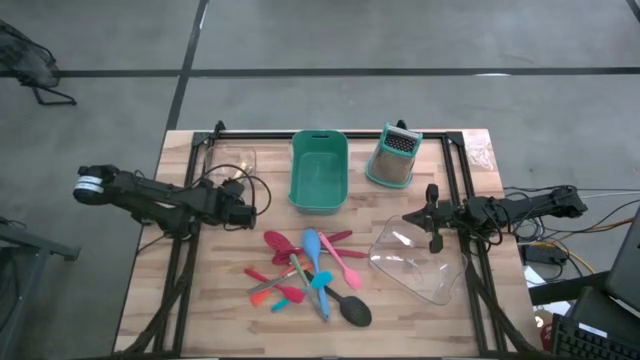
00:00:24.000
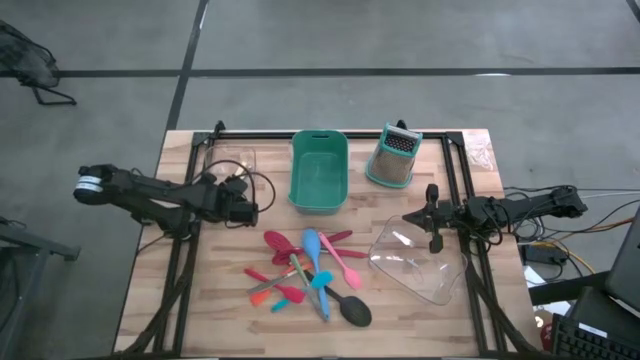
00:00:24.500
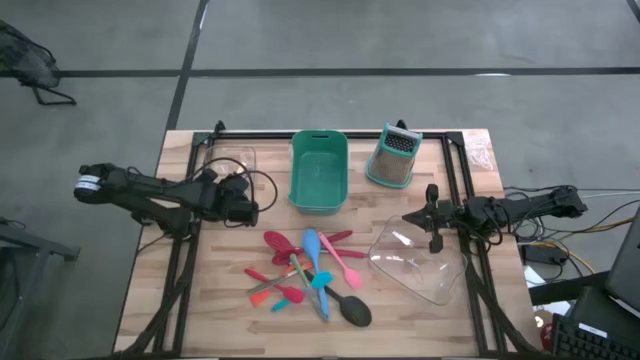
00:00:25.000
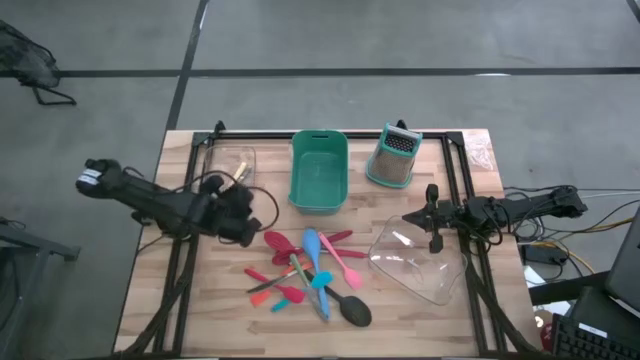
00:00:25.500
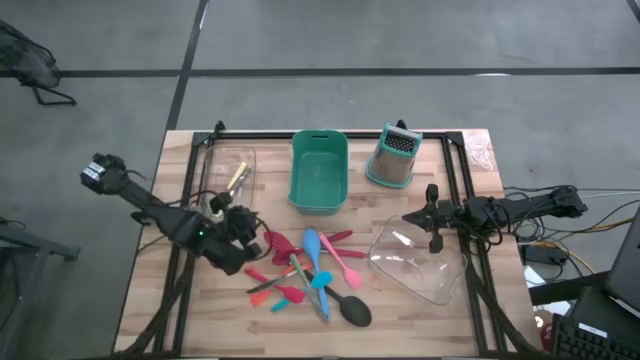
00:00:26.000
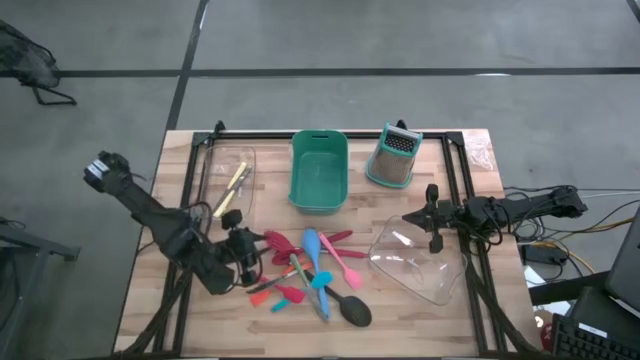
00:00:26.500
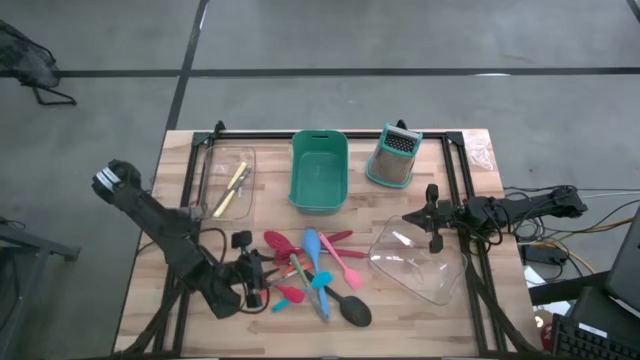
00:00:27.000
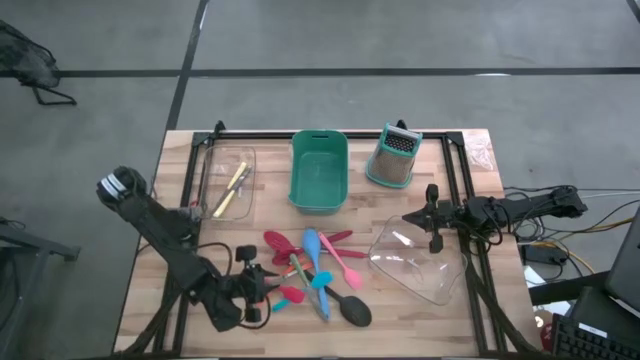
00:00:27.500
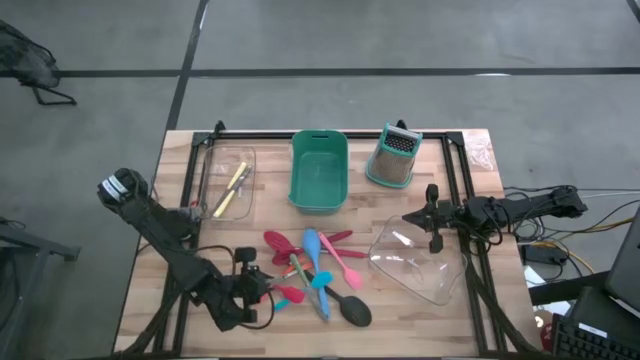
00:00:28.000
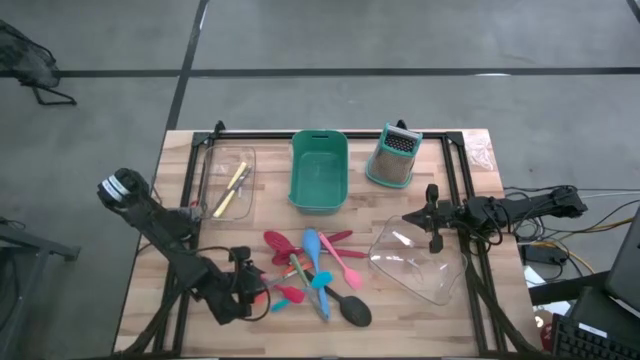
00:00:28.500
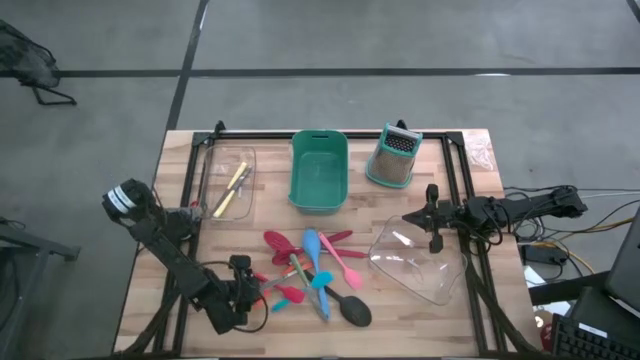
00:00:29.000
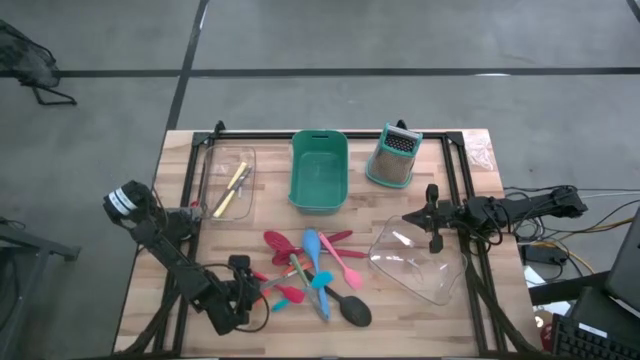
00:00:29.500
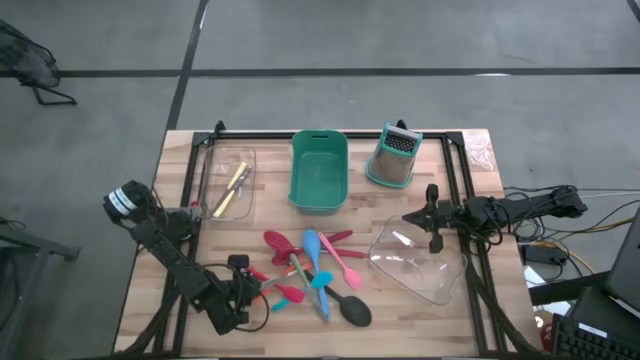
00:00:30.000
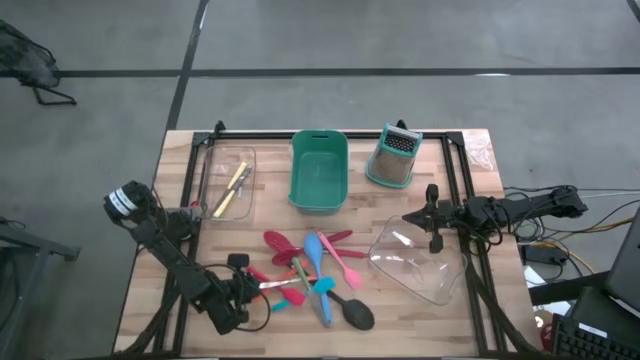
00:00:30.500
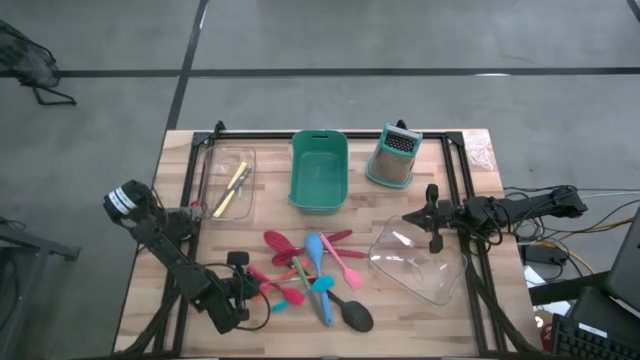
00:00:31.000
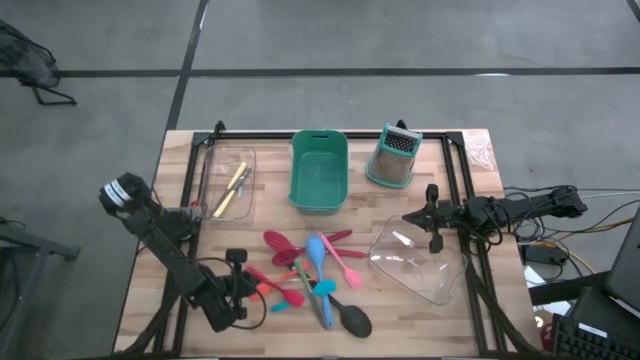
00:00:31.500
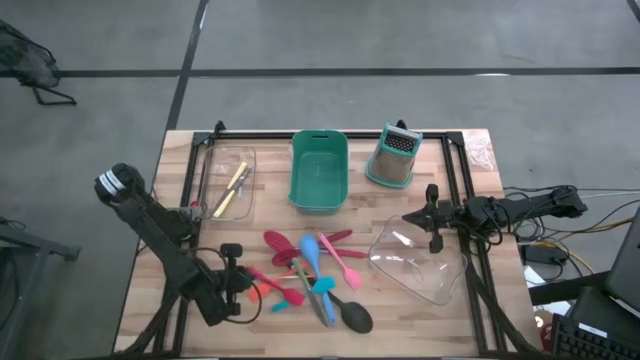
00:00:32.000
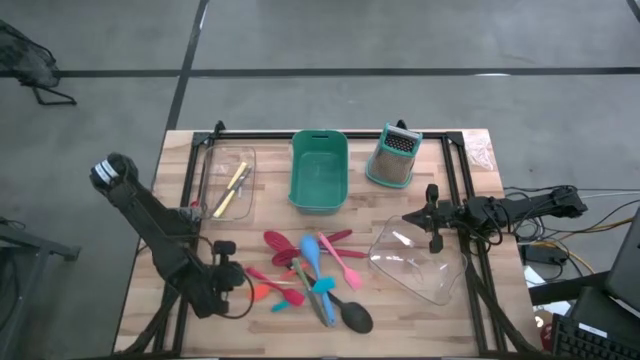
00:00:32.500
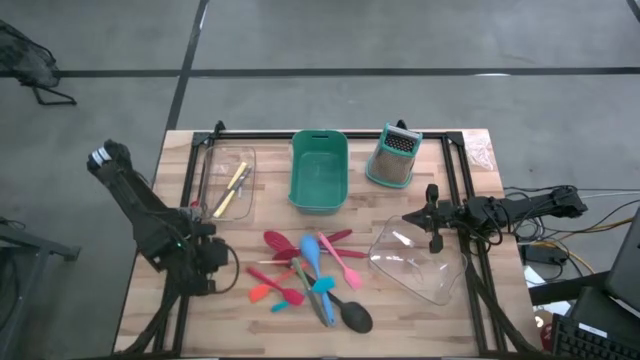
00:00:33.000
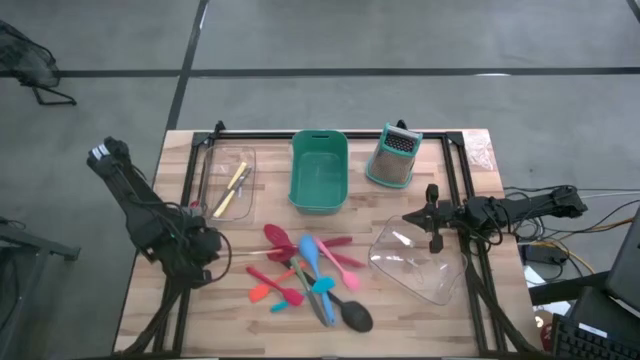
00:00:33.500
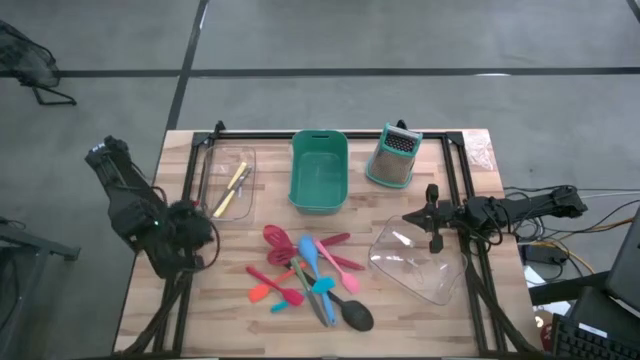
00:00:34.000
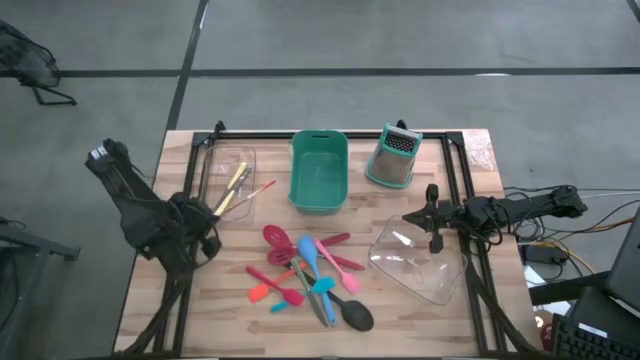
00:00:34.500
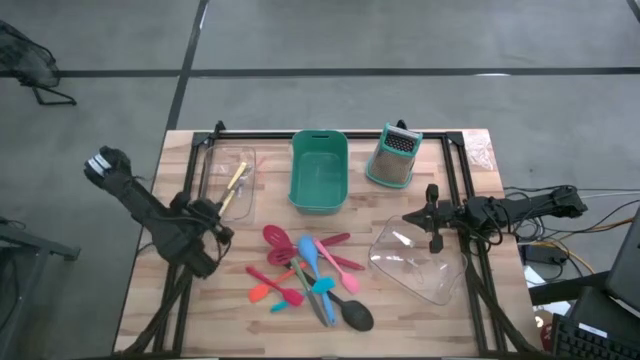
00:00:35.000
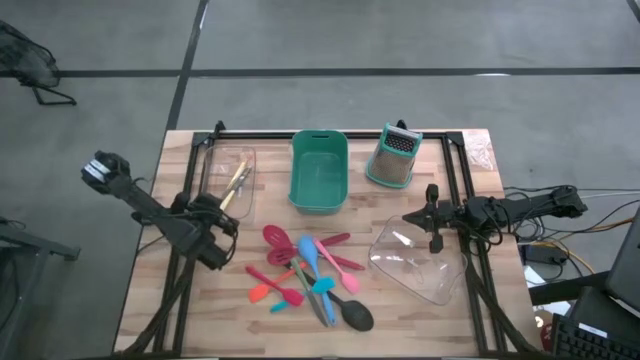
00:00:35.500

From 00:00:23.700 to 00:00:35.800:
Task: Pick & Place Kitchen Items
Put the orange table knife into the top transparent bin

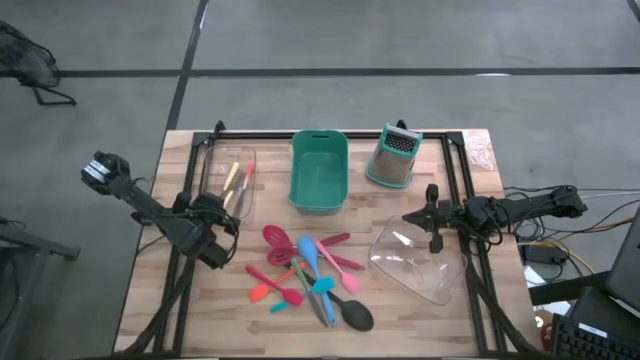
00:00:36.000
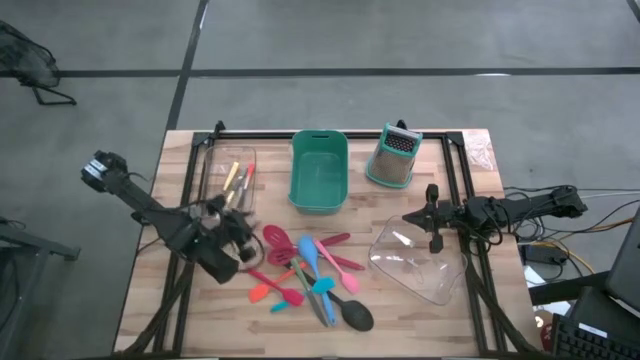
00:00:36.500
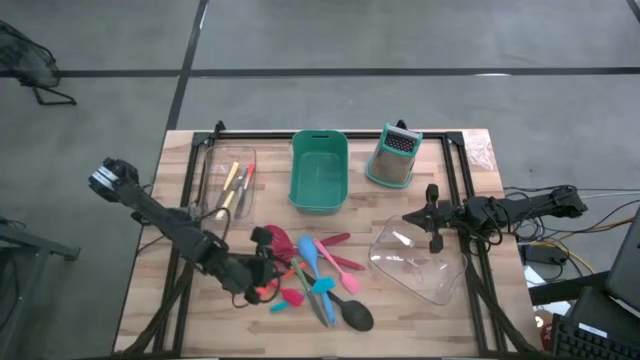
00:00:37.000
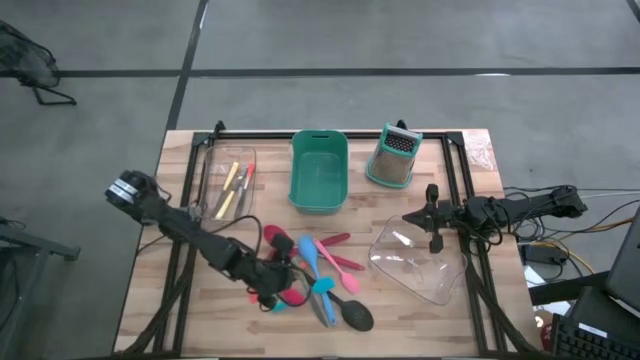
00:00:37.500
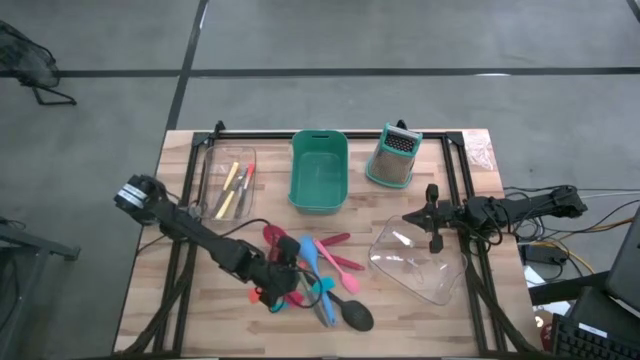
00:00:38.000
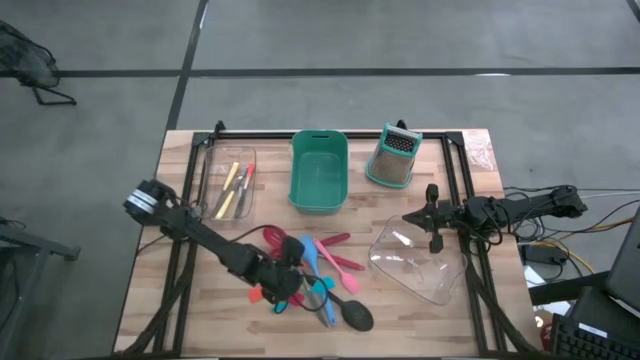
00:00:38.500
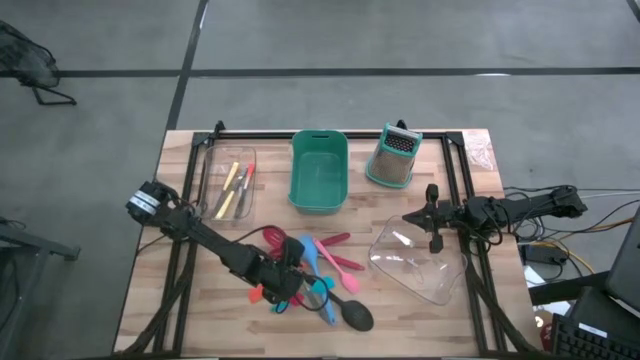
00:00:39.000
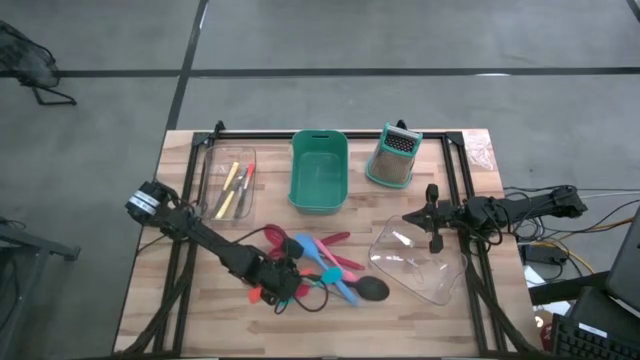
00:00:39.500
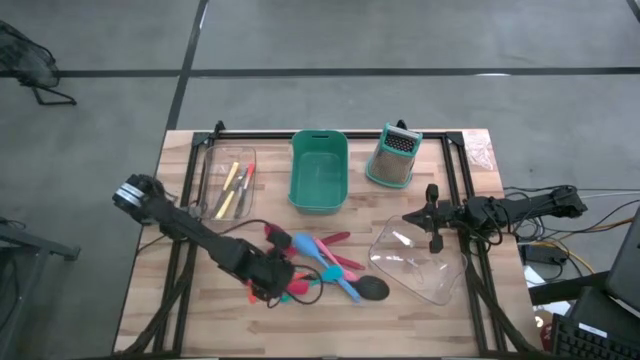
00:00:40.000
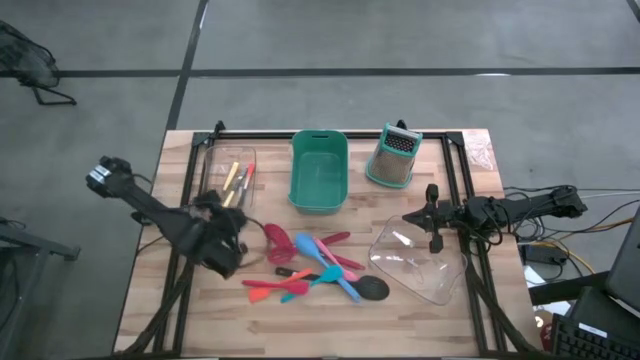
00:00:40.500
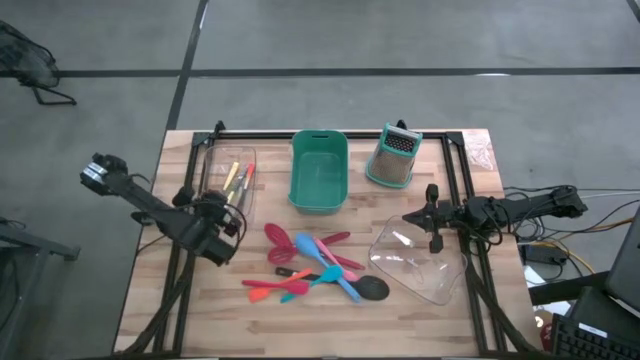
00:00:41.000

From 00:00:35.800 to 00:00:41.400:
Put the green table knife into the top transparent bin

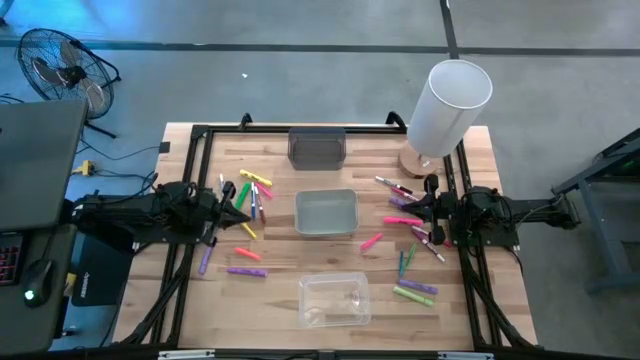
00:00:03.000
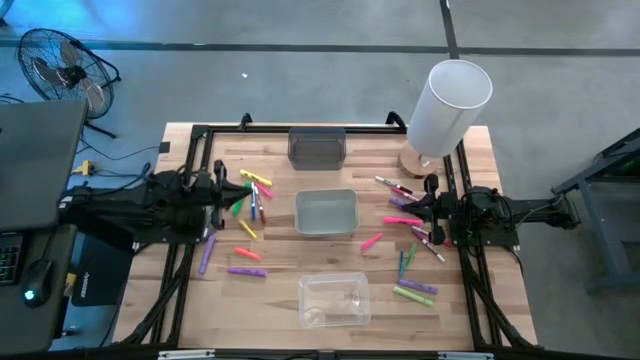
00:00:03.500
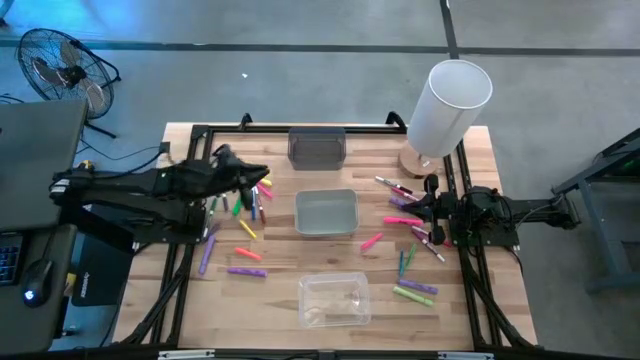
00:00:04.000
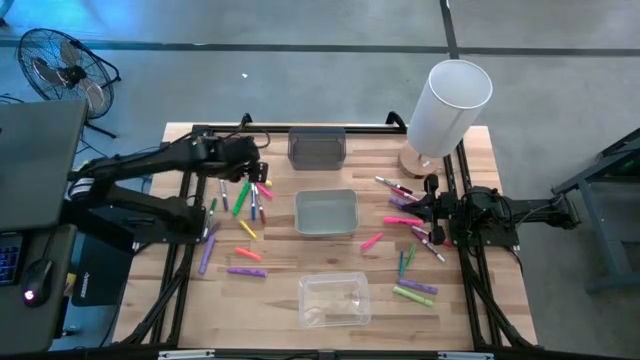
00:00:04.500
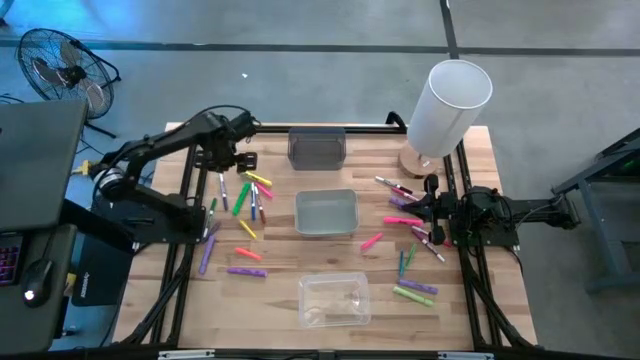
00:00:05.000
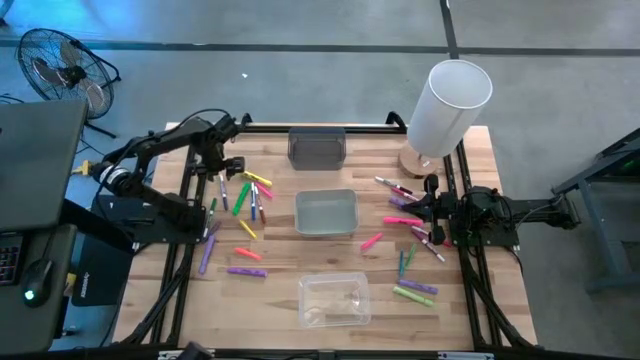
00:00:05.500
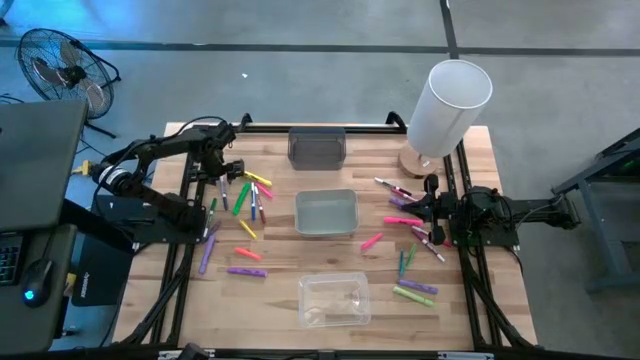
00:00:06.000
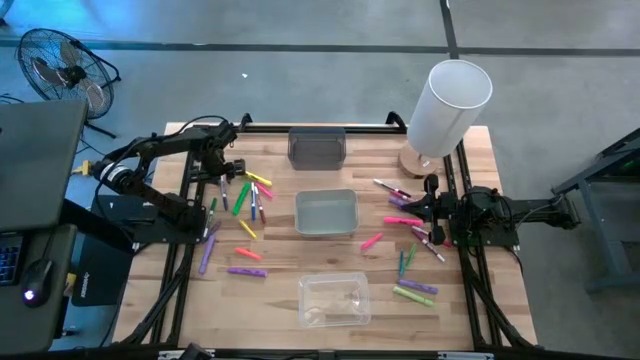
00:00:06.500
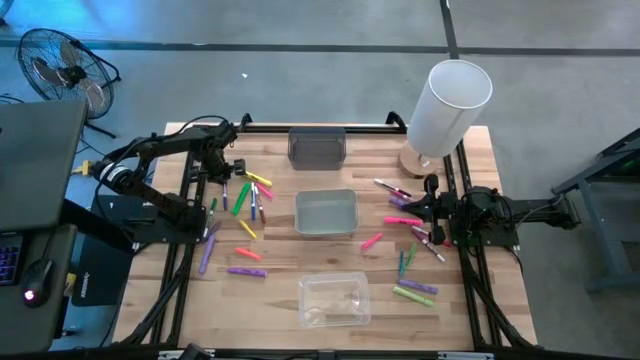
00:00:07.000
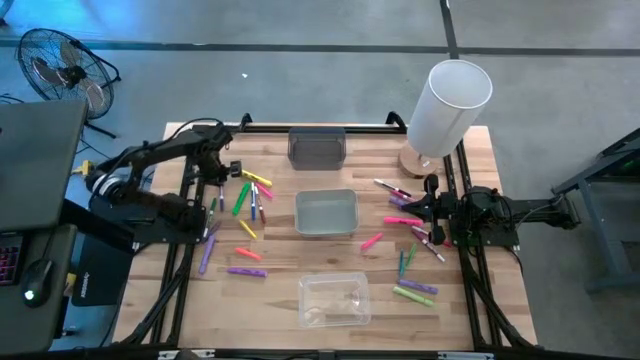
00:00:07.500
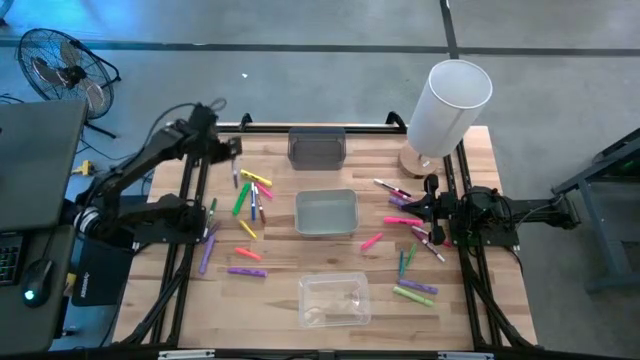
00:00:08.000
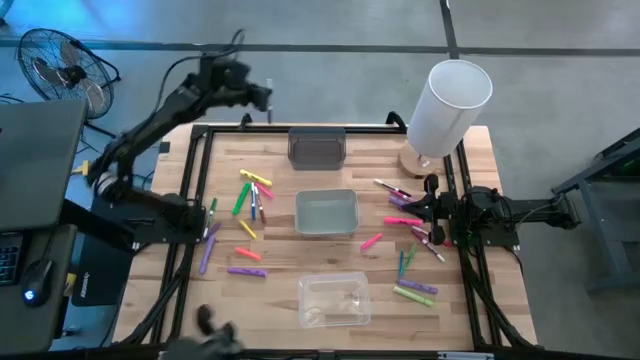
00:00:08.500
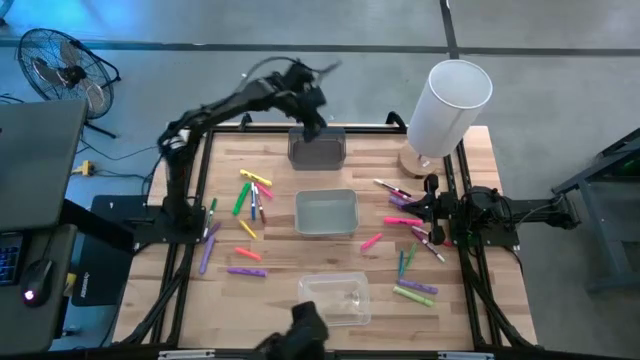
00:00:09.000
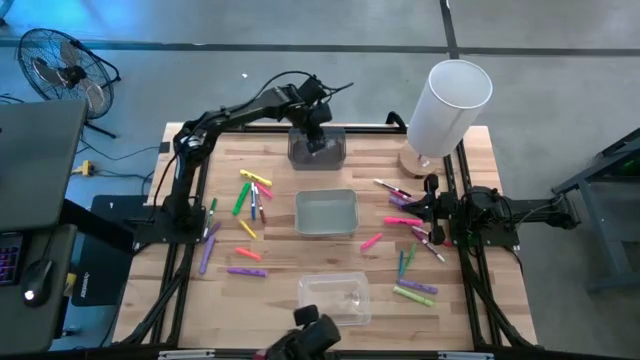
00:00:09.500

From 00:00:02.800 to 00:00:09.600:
Task: Pick & Place Markers
Put the blue marker pen into the black bin
